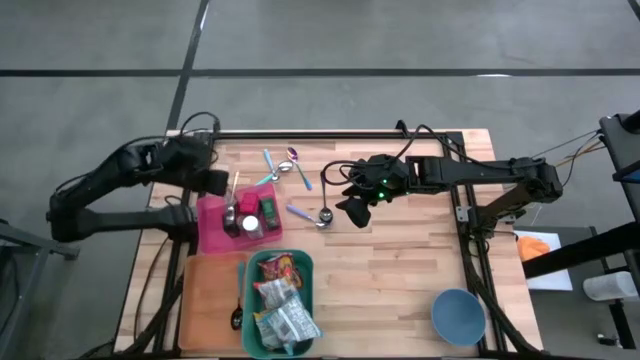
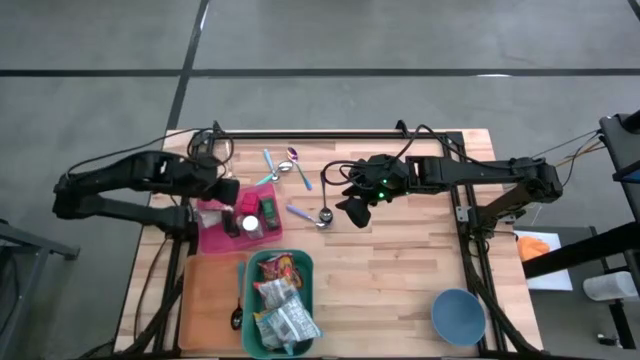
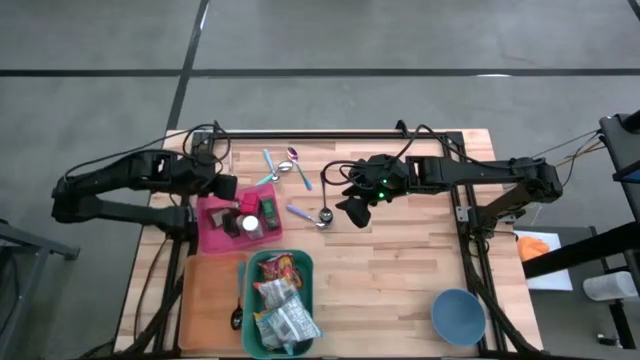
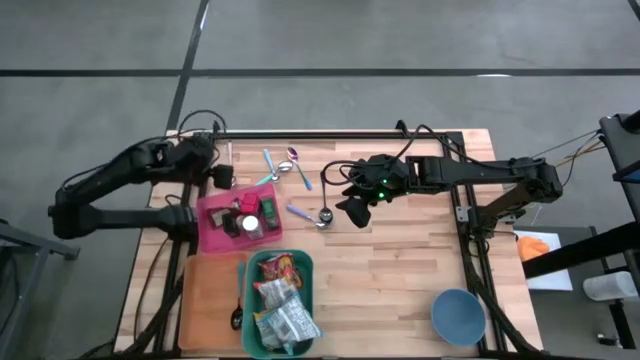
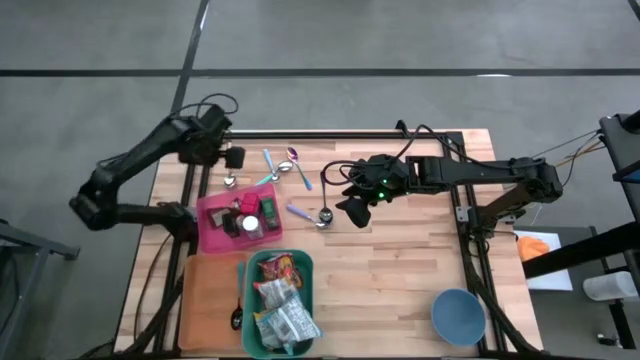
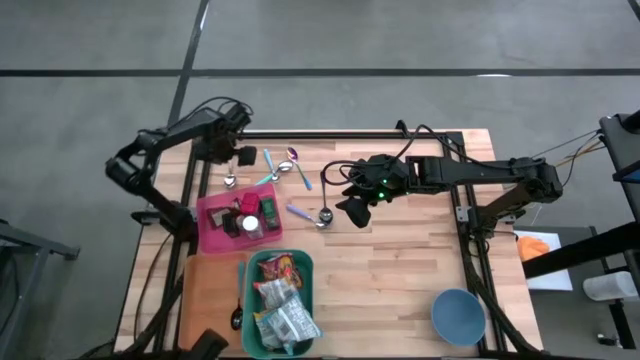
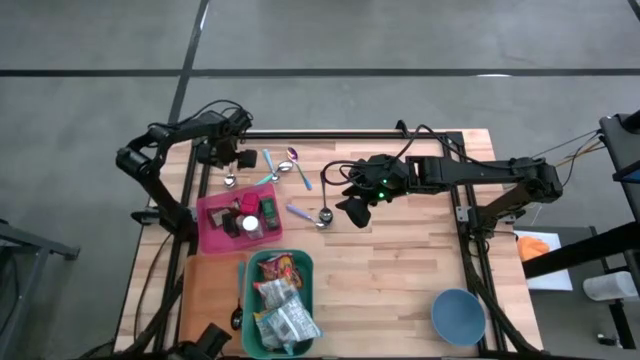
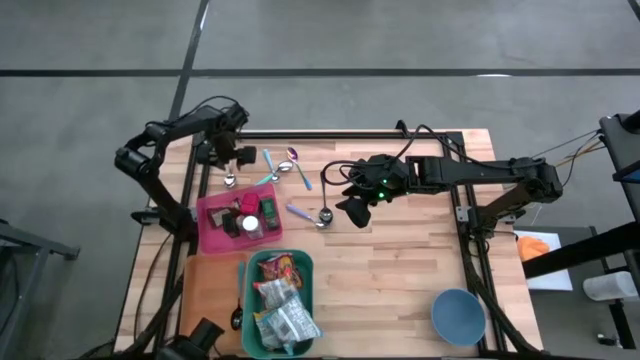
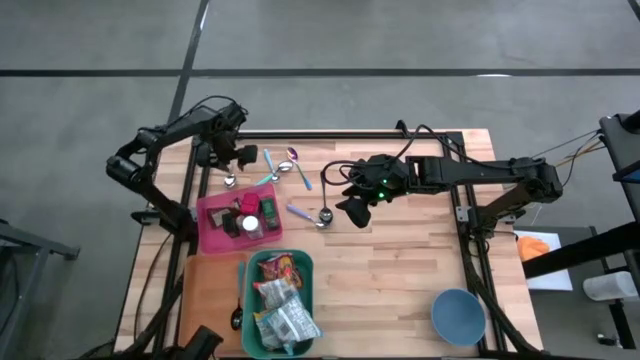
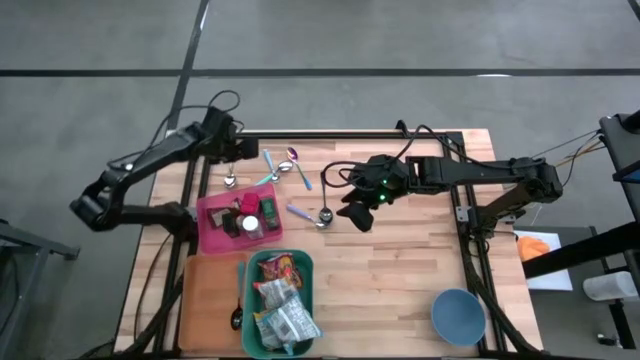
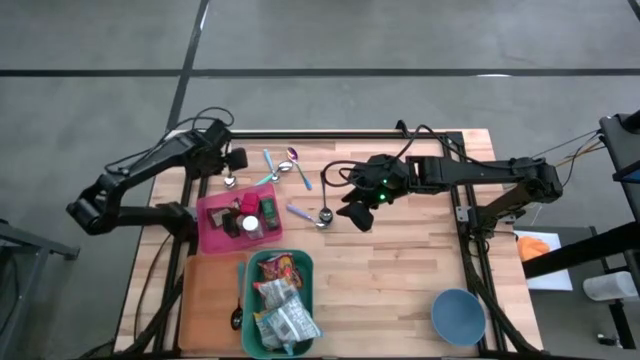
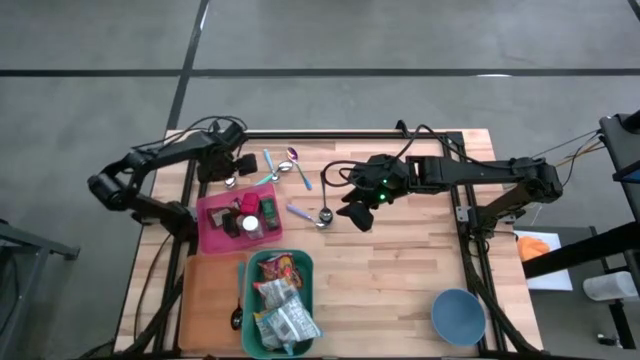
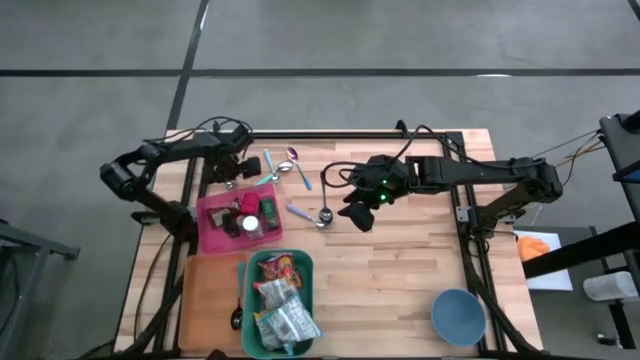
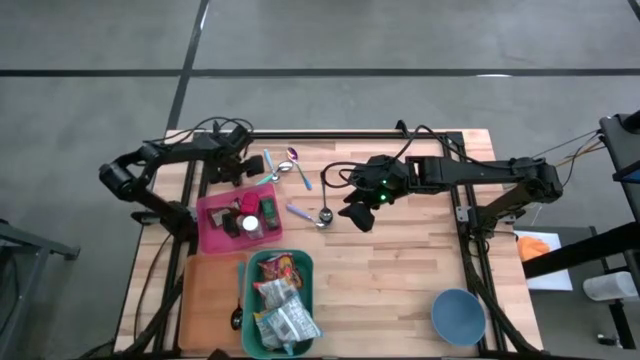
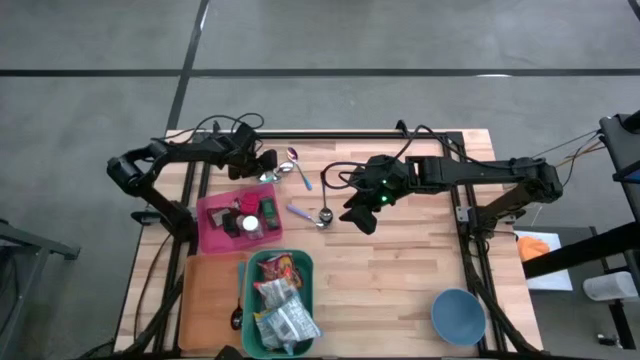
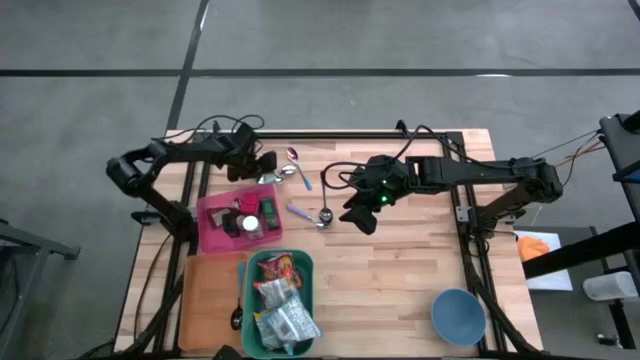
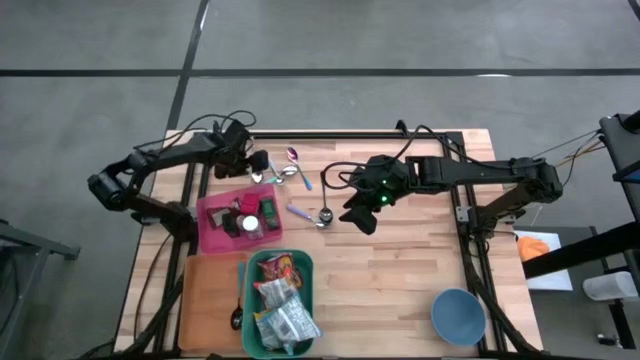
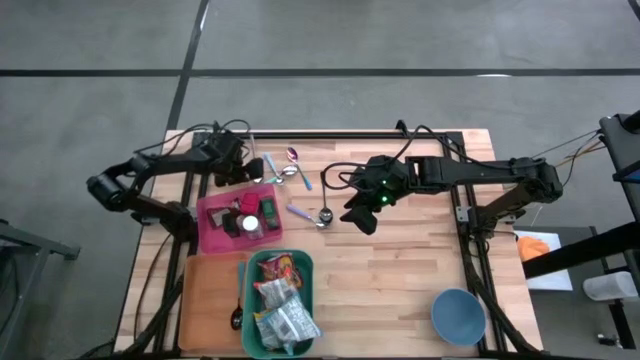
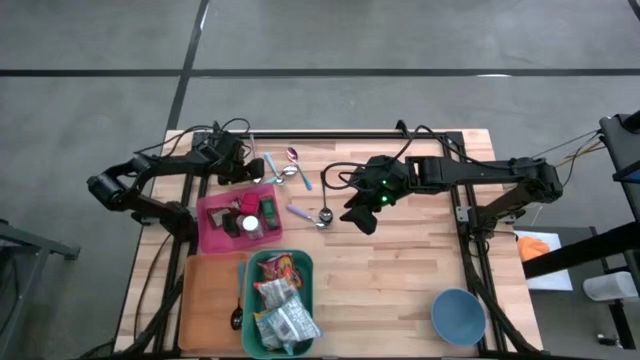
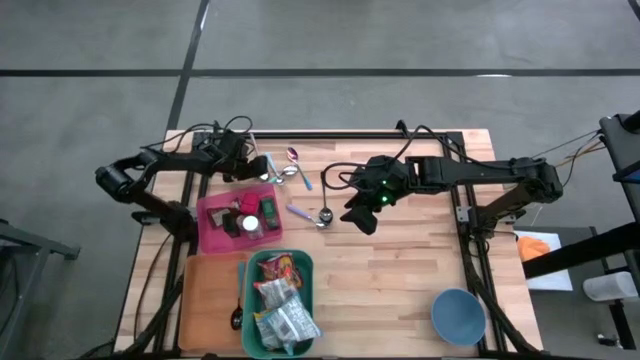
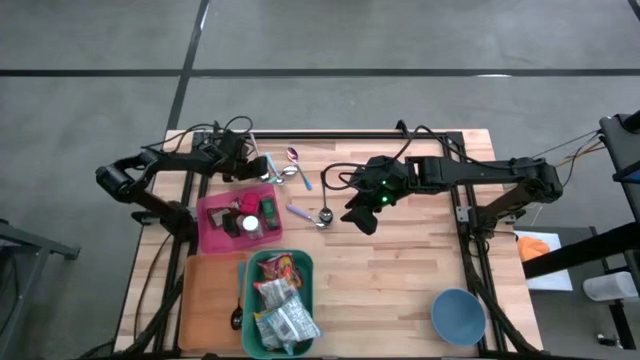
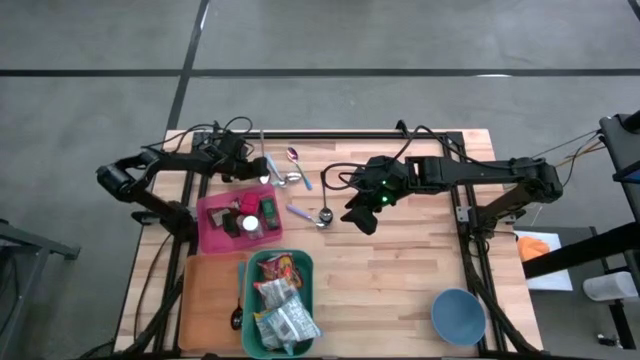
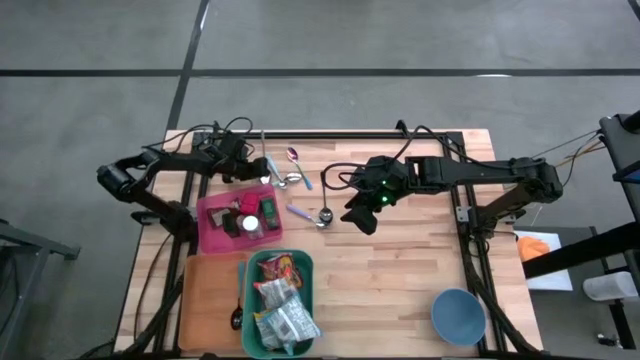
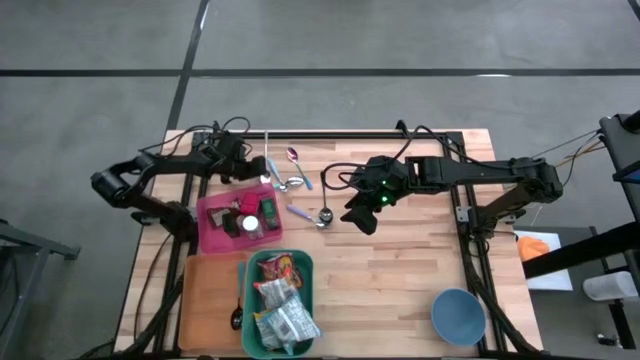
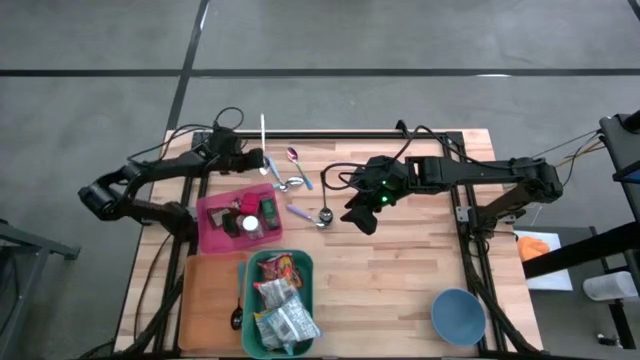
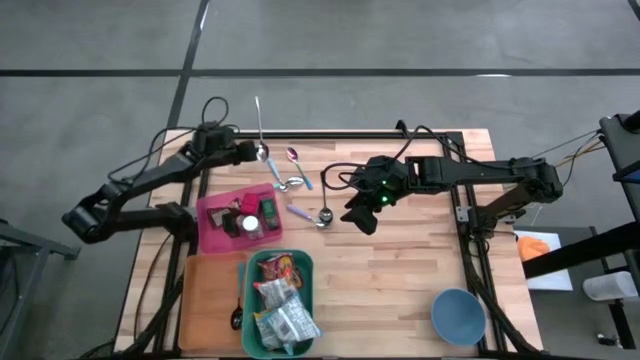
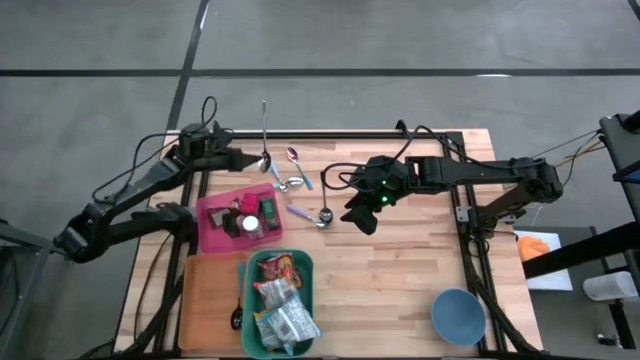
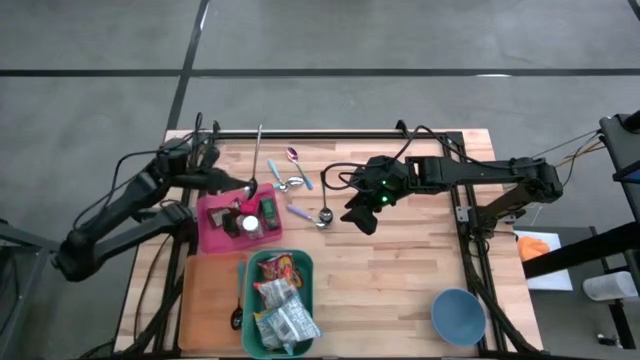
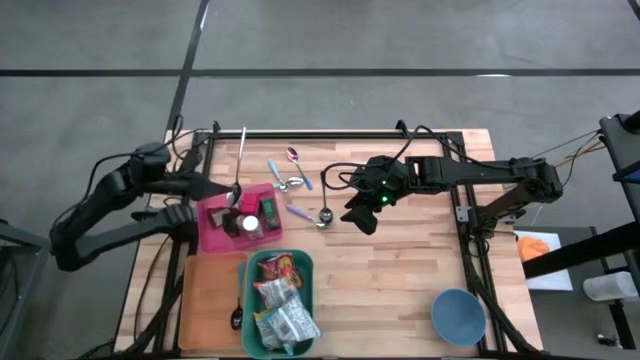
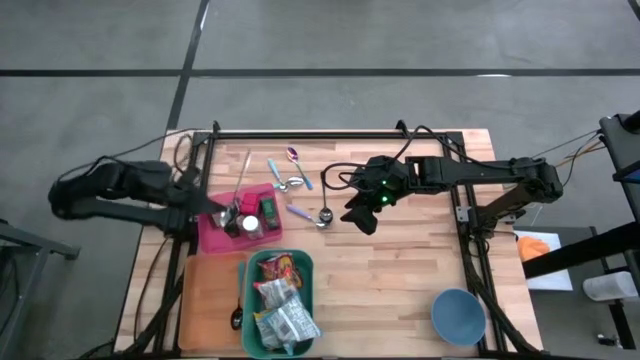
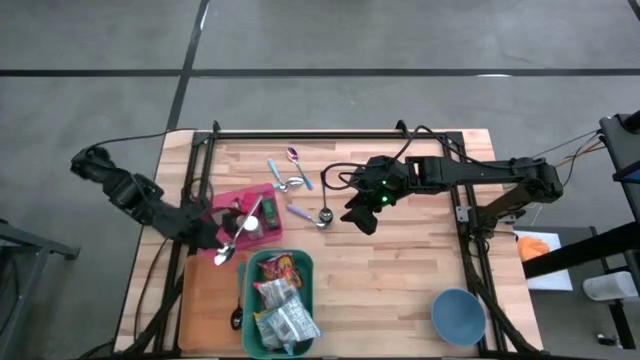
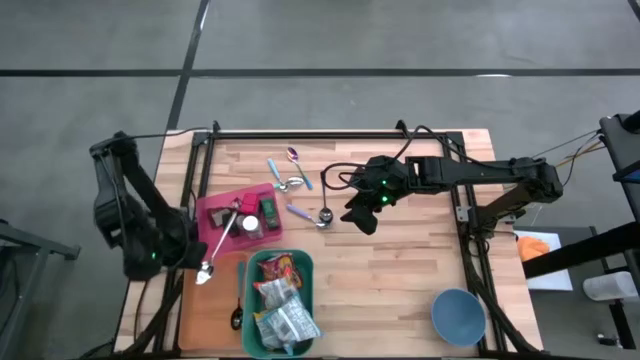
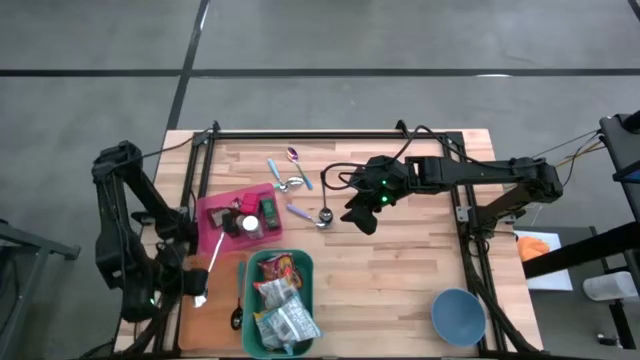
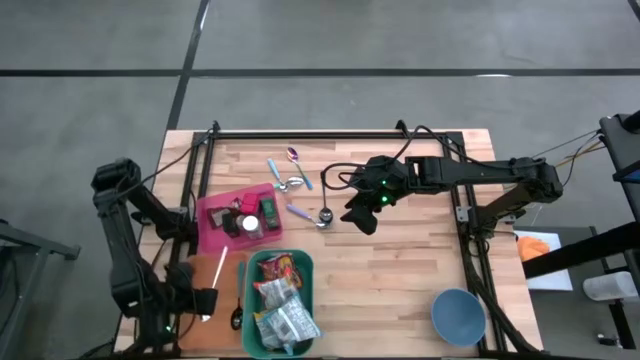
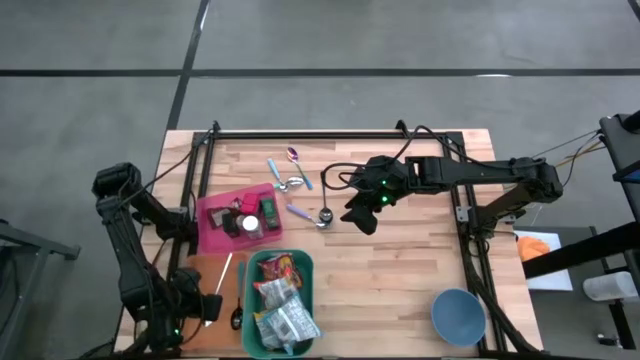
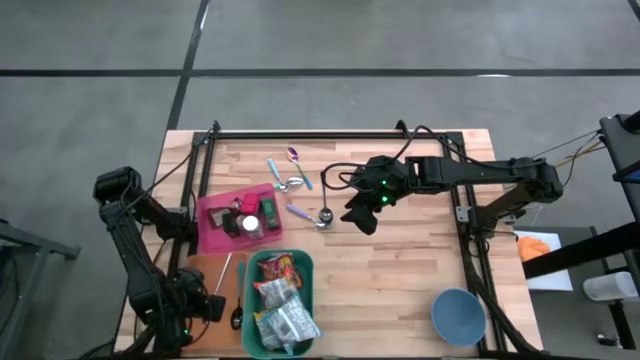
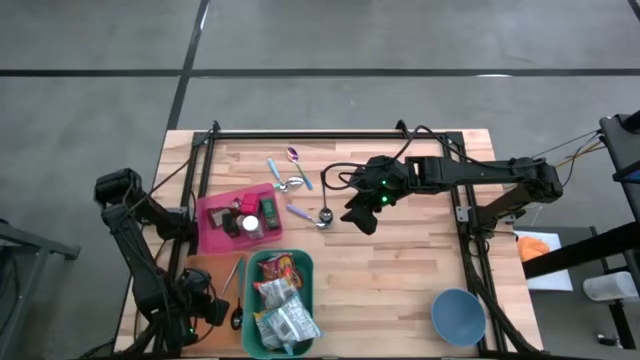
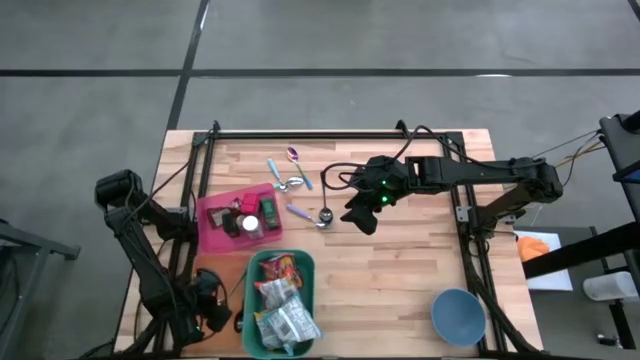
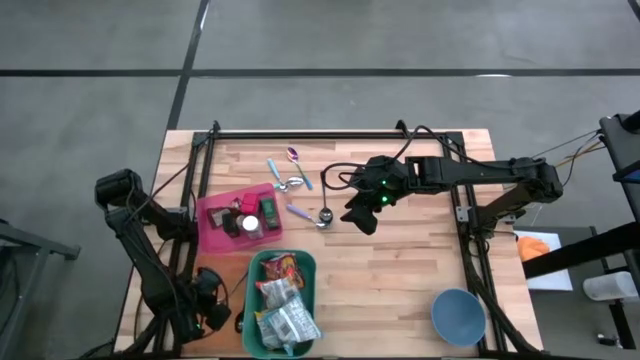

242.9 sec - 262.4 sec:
Put the silver spoon into the orange bin
